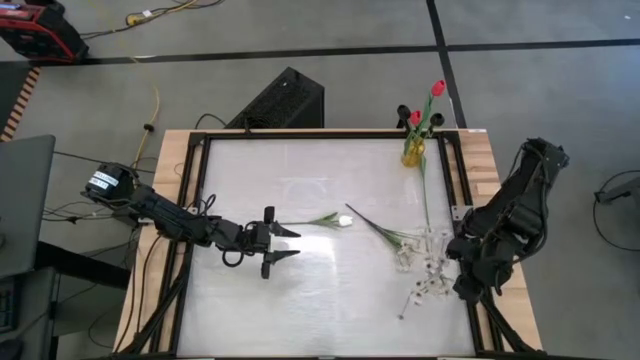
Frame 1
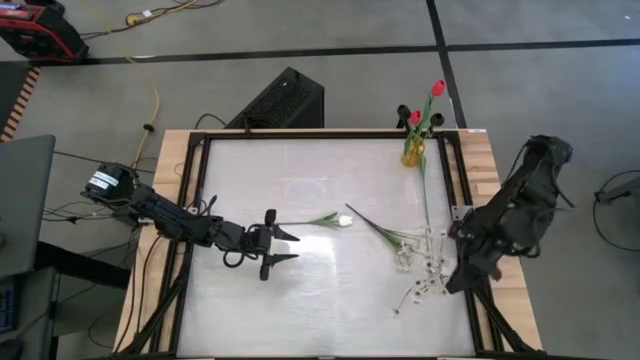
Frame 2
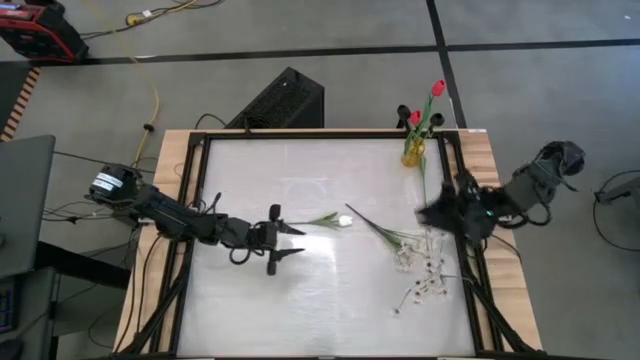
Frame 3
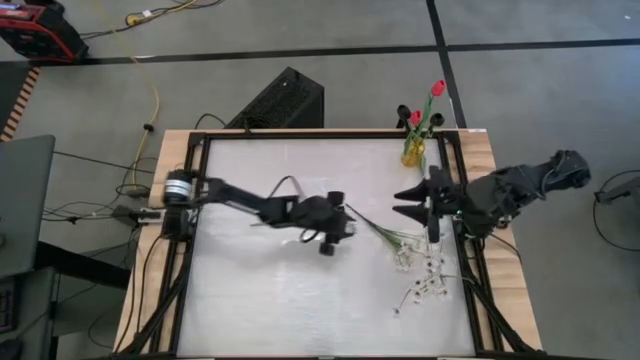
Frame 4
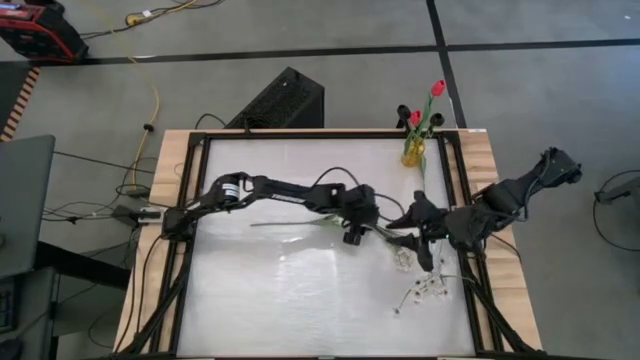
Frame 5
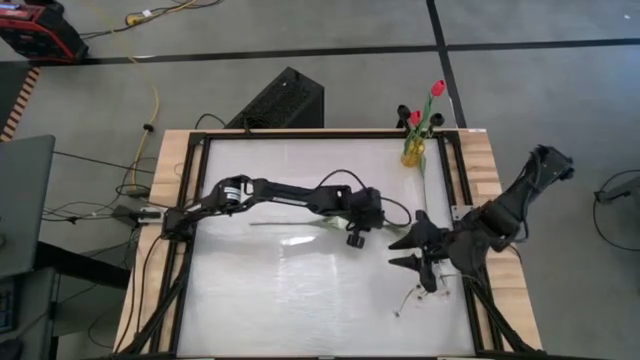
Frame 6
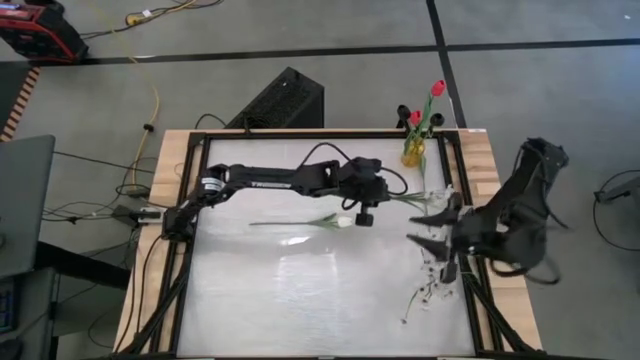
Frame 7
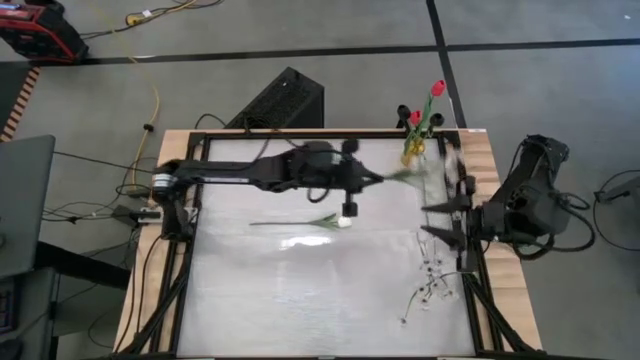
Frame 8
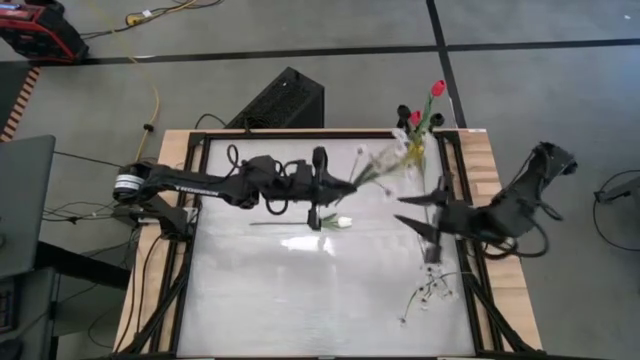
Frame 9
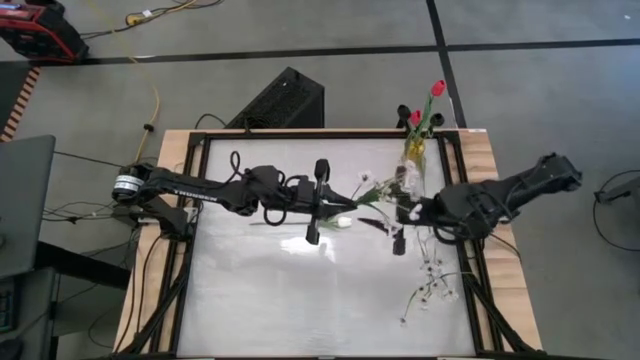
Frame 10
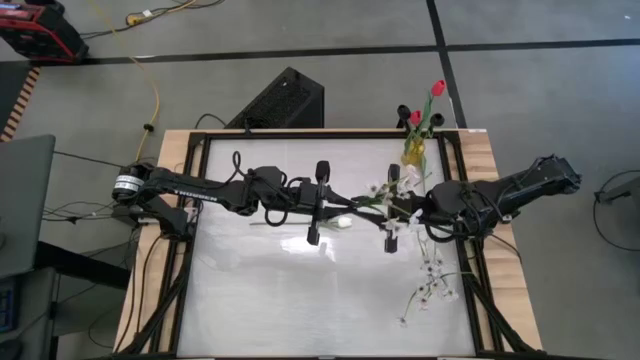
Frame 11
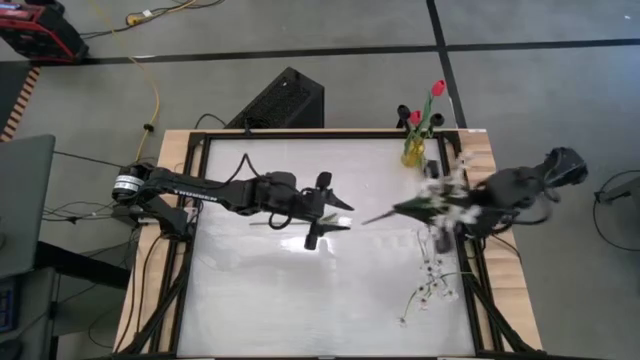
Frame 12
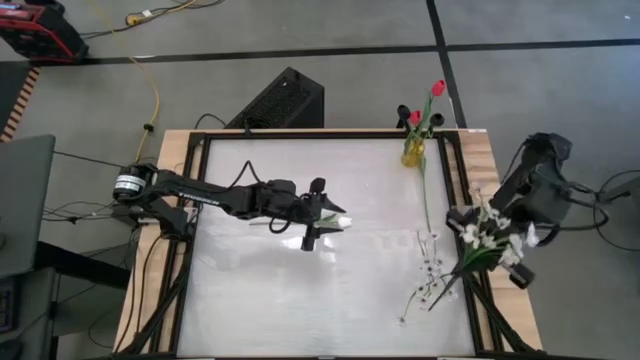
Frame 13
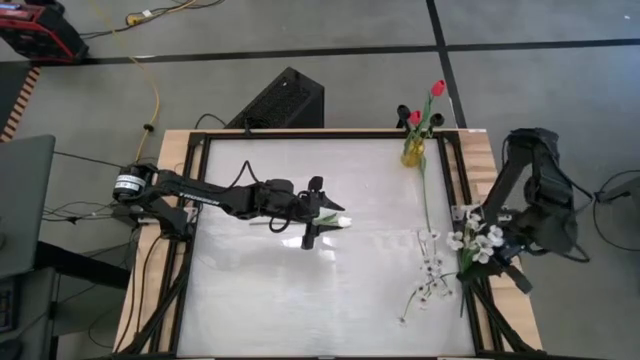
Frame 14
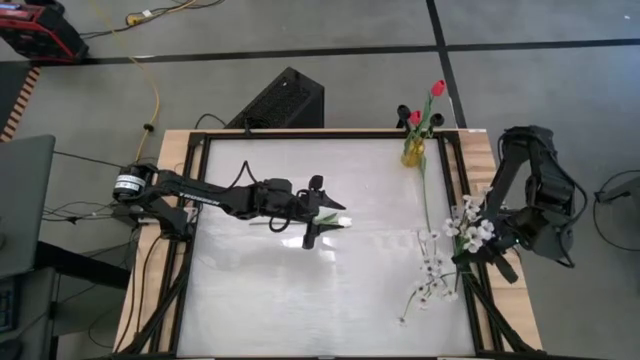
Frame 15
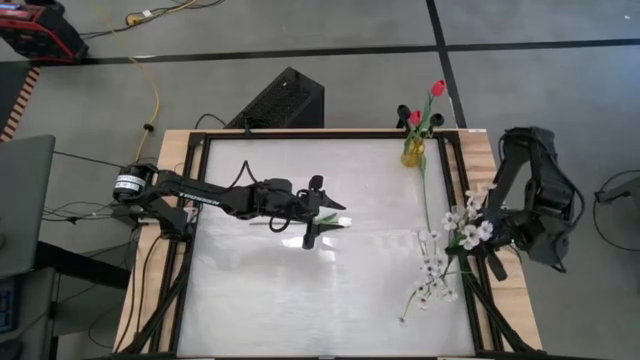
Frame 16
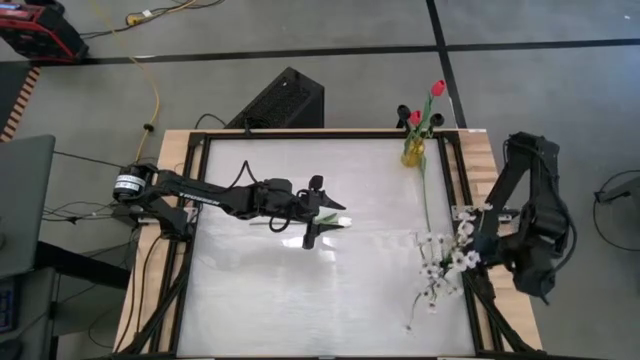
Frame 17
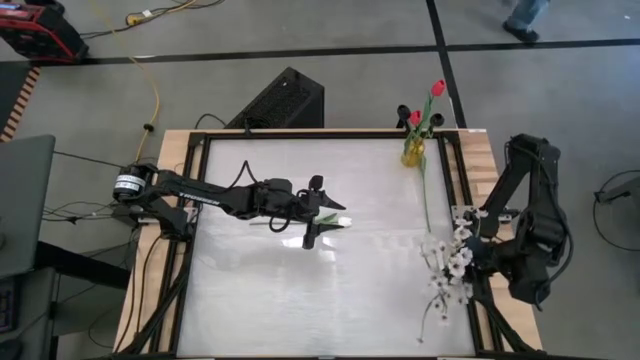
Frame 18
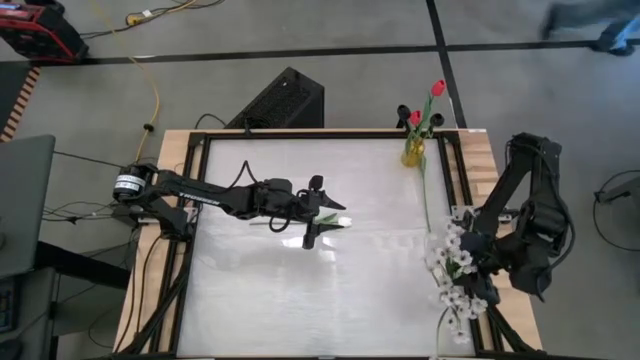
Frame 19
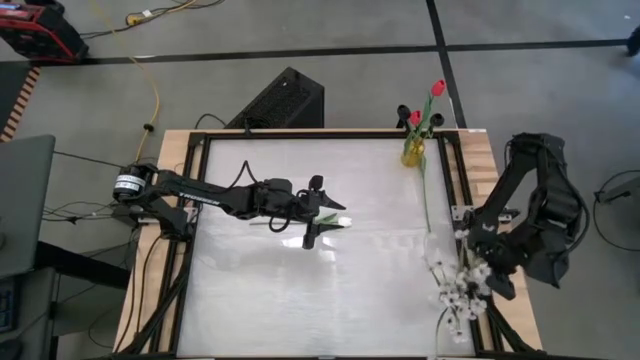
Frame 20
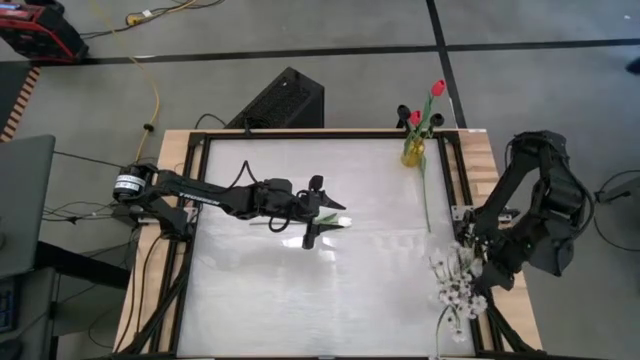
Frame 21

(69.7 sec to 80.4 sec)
Task: Sort flowers into vase by color
Put the white flower into the transparent flower vase

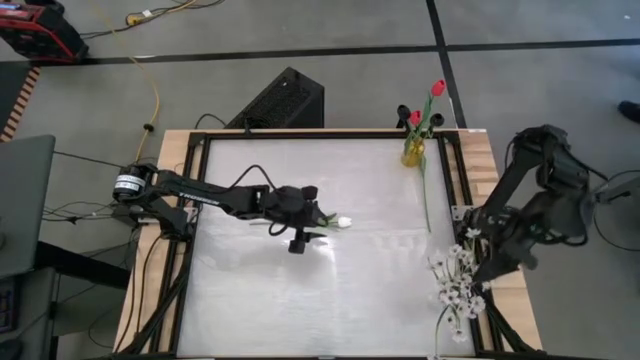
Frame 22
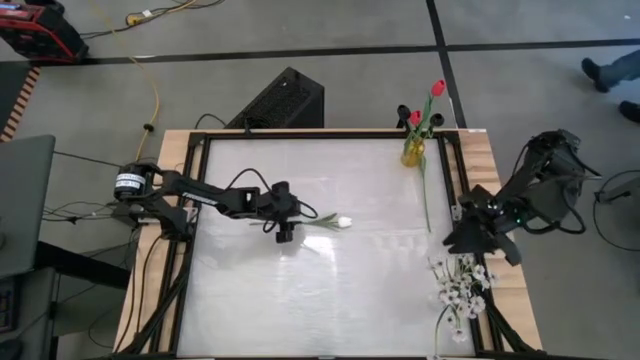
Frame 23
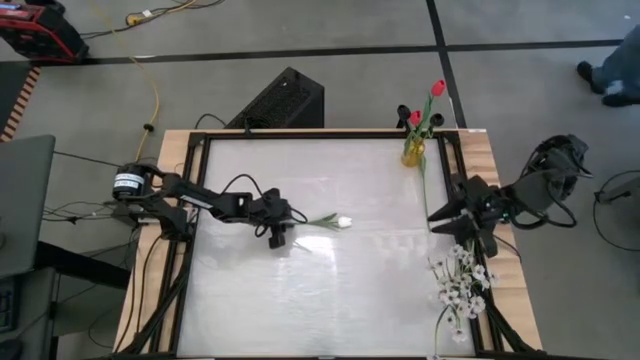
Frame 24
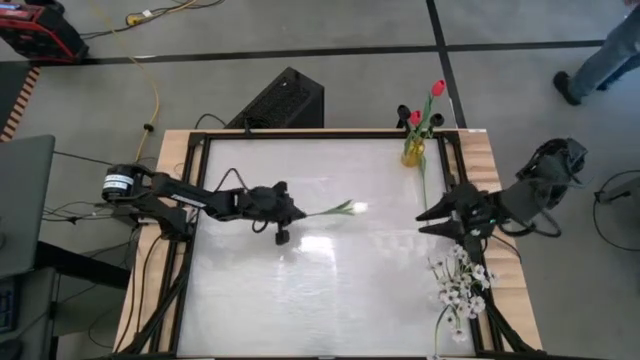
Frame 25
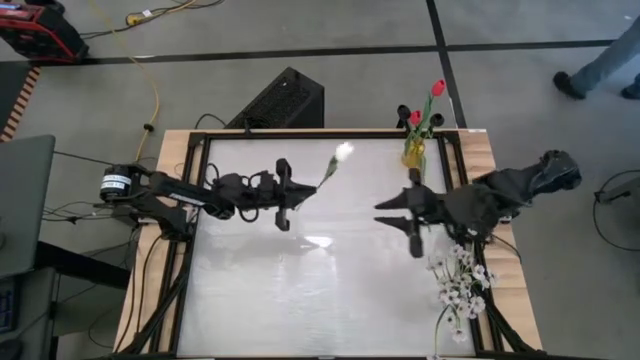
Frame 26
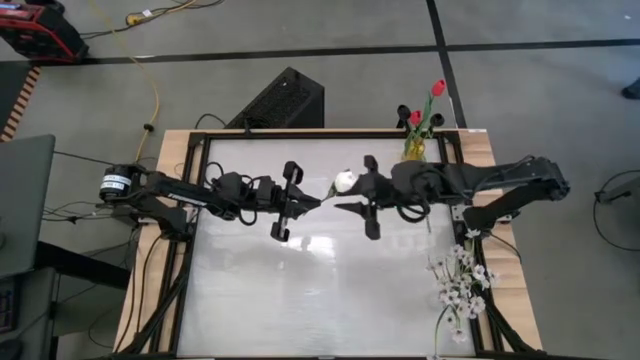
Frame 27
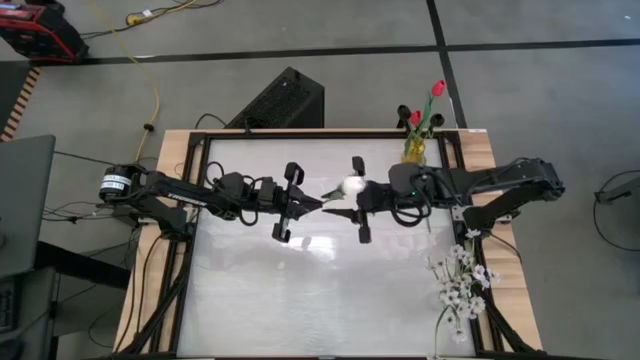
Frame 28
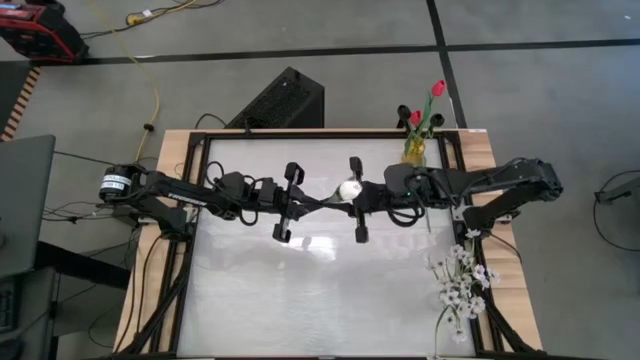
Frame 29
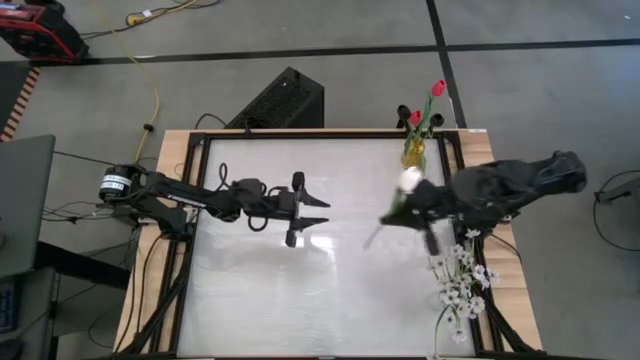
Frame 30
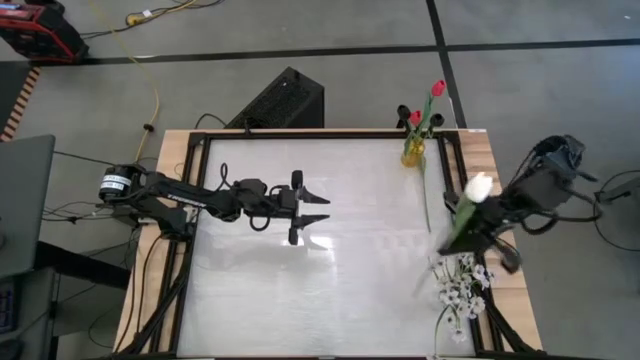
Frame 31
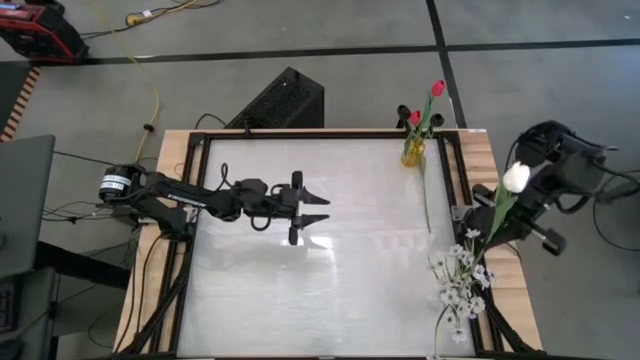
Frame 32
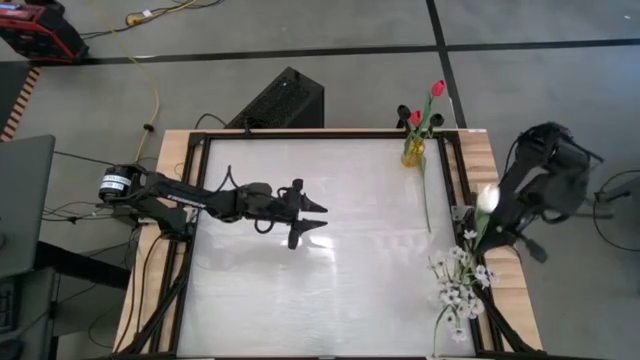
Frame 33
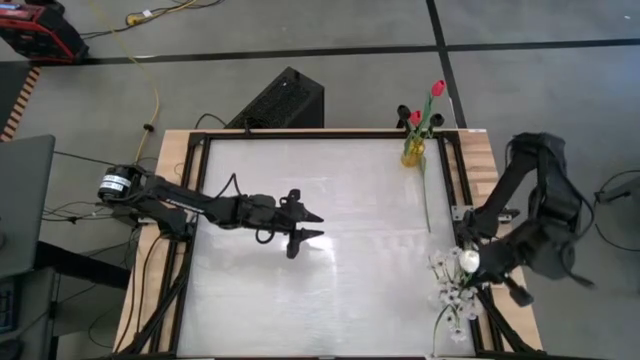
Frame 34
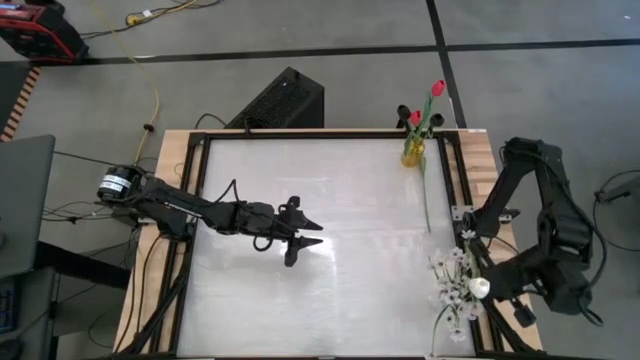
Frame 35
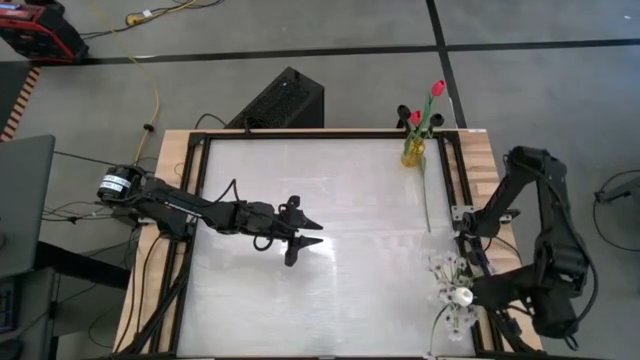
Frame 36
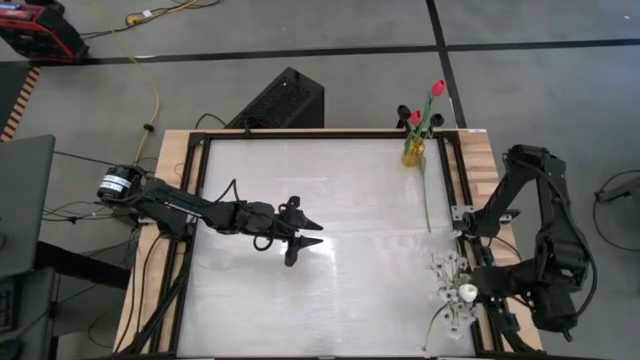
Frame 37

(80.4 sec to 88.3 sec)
Put the bottom white flower into the transparent flower vase

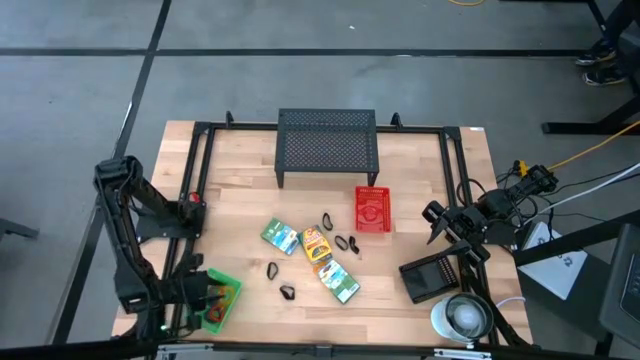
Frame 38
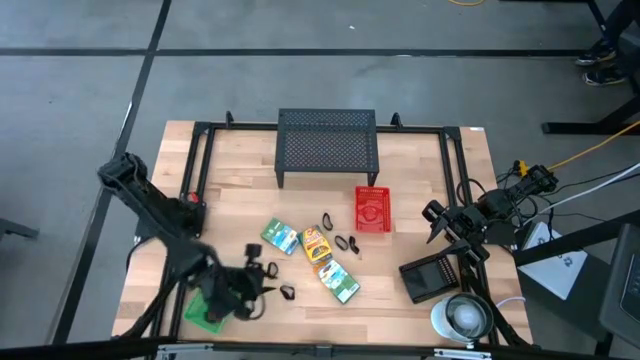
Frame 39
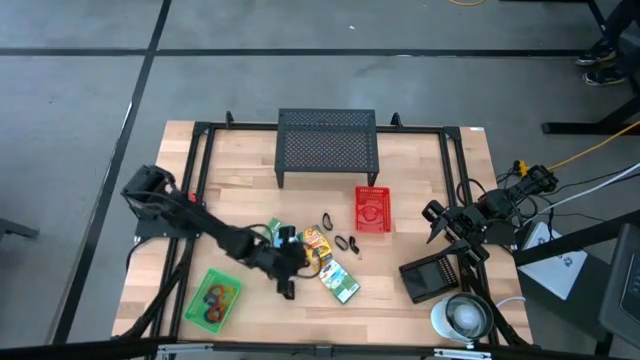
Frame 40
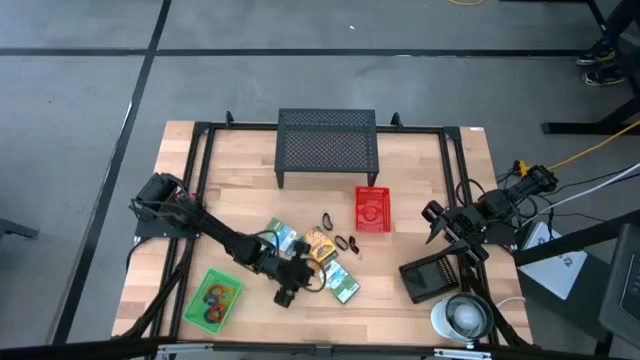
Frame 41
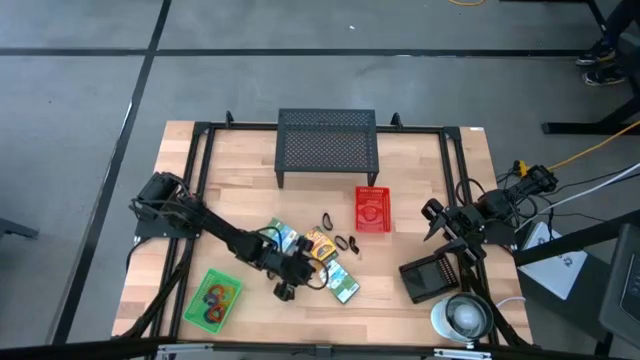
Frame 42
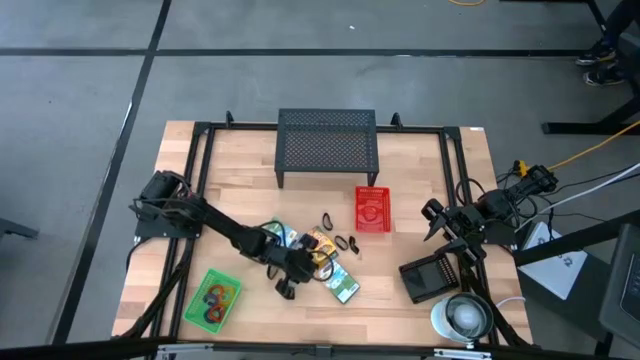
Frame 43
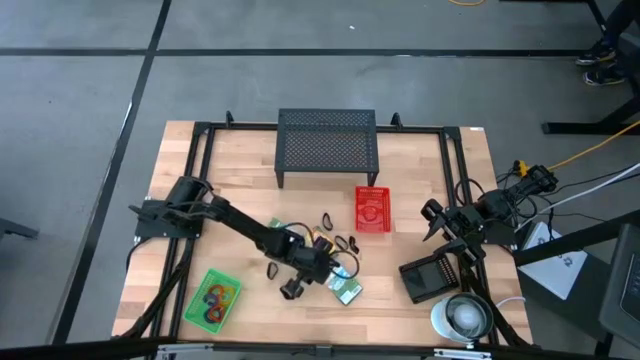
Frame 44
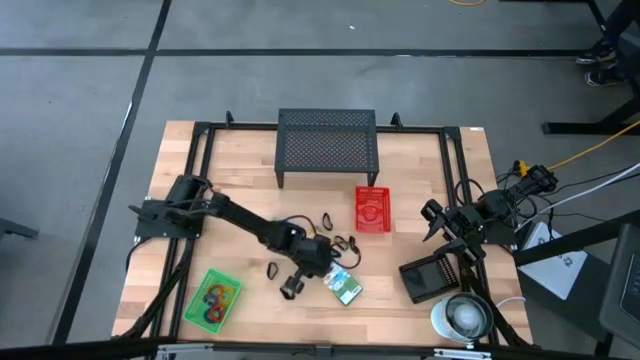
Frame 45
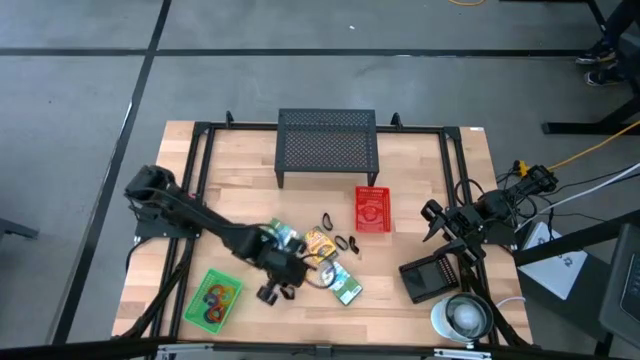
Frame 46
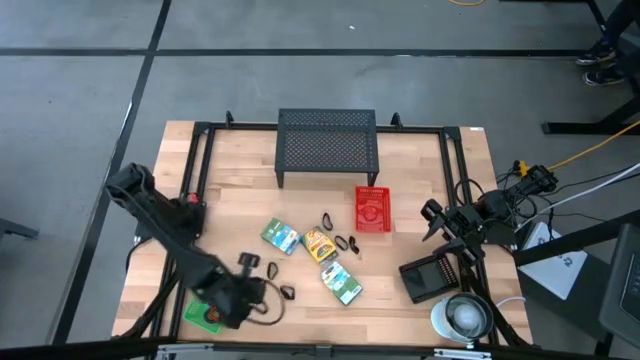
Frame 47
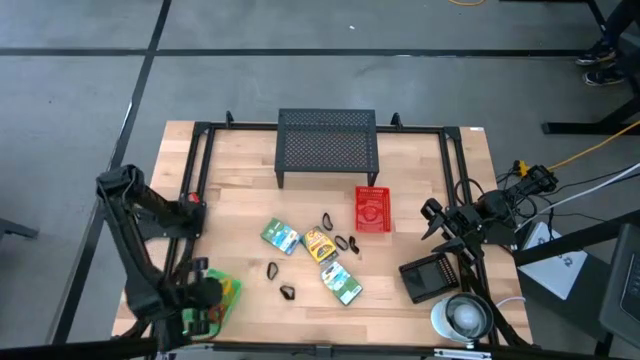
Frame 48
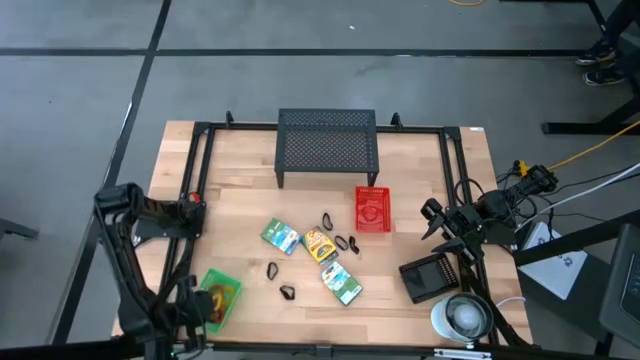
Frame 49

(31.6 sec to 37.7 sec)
Task: Pick & Place Office Desk Supplies
Put the yellow spring keychain into the green bin
